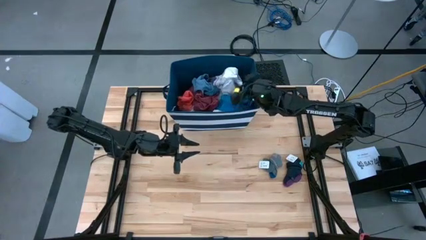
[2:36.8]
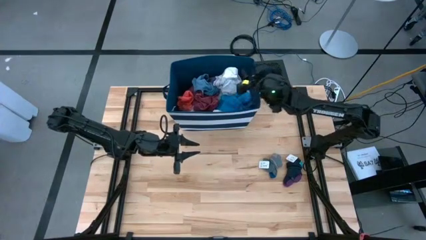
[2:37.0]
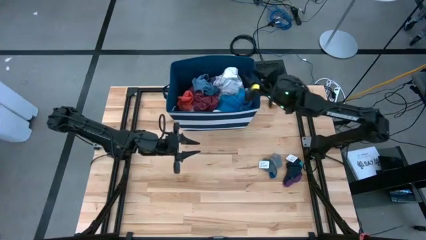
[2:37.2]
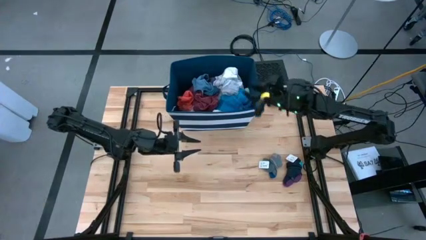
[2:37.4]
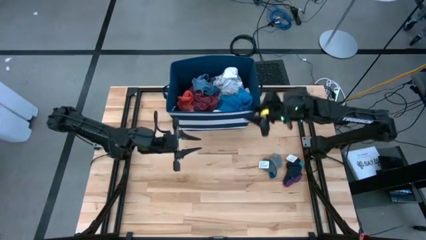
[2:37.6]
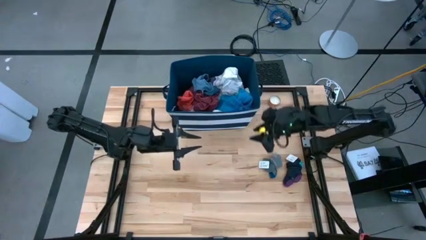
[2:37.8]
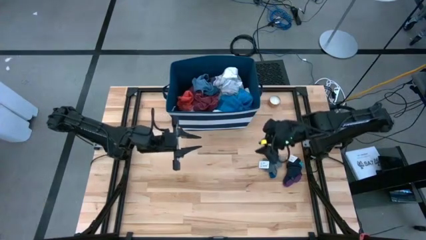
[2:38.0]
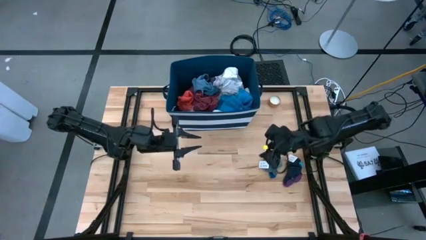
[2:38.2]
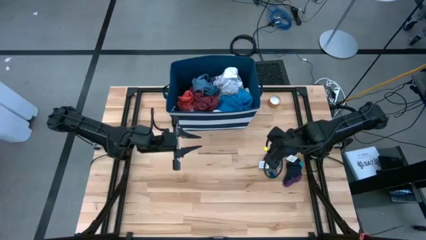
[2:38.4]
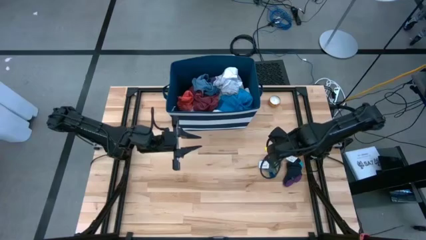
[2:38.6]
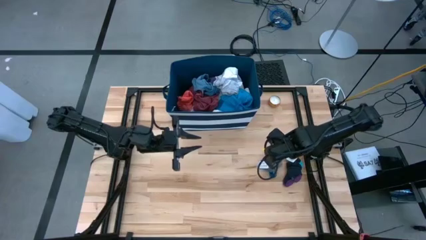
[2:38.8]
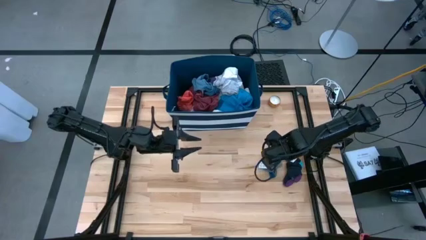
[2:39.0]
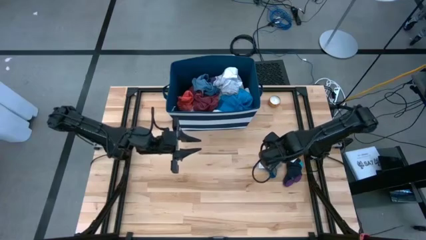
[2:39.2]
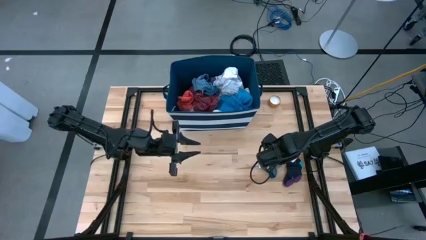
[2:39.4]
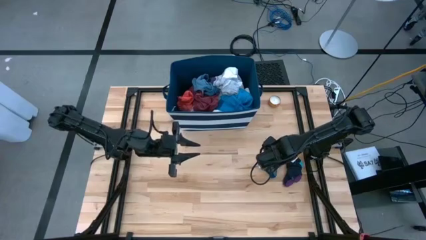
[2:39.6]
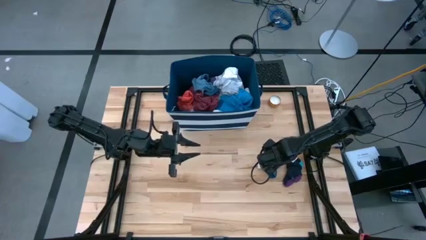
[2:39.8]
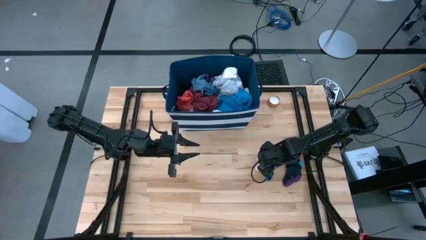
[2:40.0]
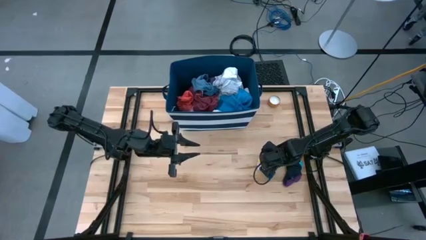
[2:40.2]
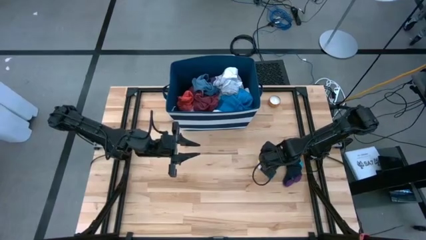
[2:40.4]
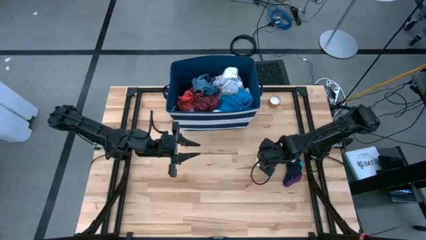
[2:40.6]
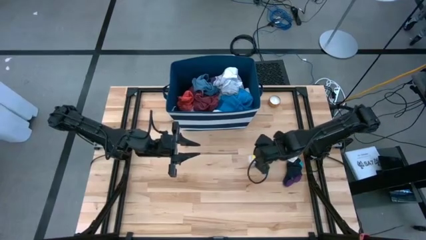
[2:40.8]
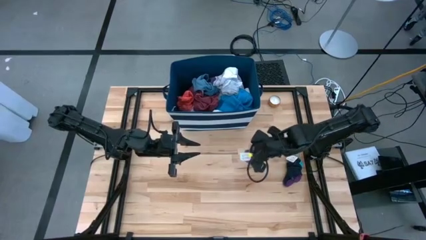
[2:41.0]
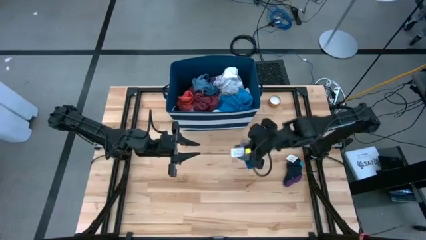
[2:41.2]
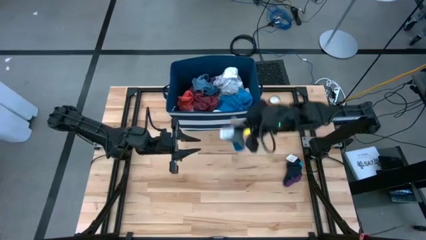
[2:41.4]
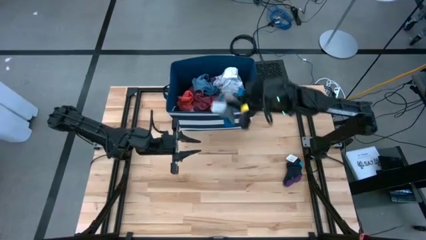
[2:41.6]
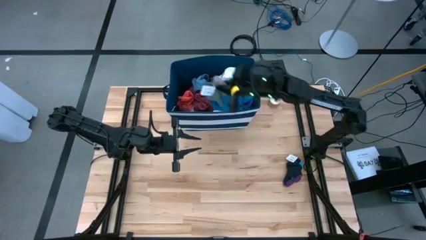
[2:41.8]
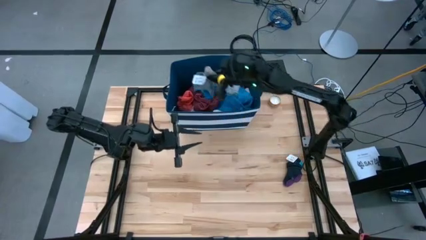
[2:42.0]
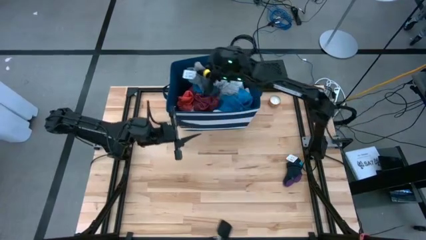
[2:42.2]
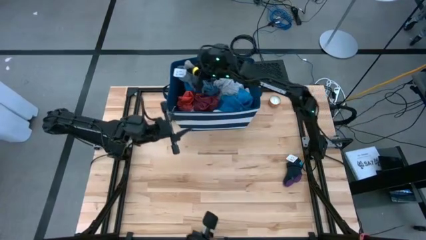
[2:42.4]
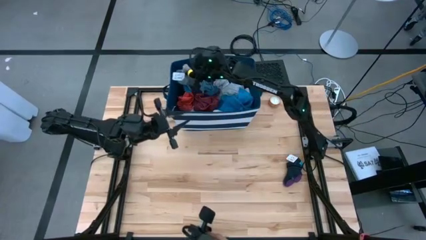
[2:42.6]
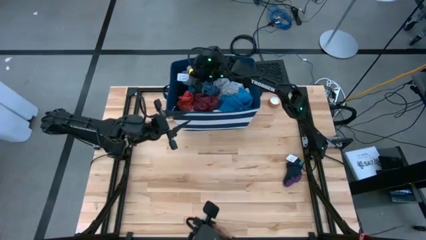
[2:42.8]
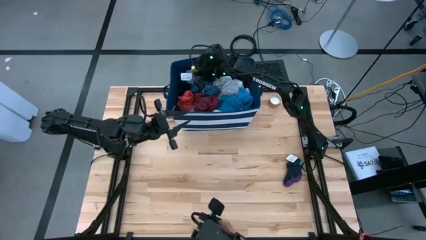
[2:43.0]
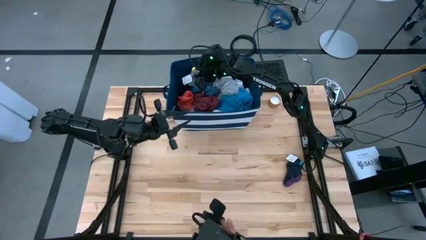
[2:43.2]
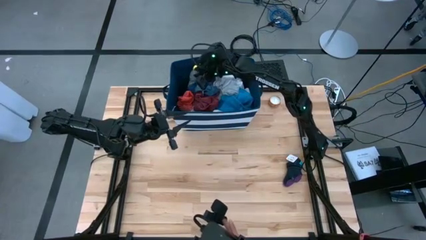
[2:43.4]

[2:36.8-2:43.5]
Task: Sort clothes
Put the gray socks into the blue laundry organizer

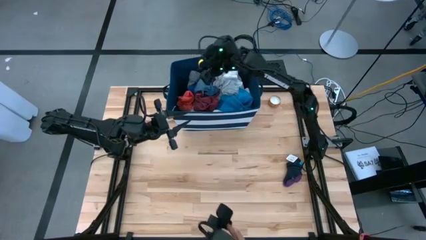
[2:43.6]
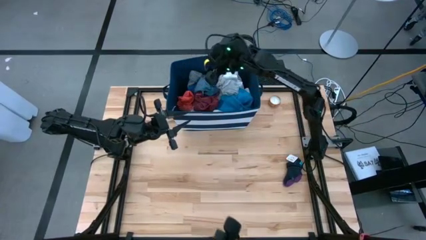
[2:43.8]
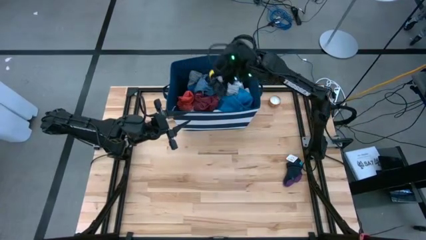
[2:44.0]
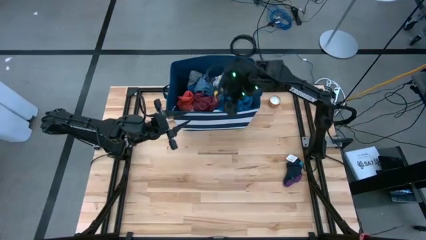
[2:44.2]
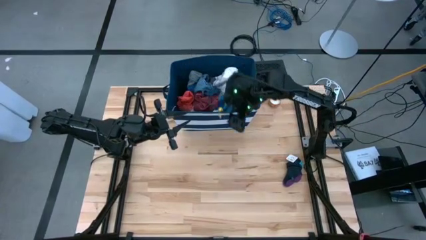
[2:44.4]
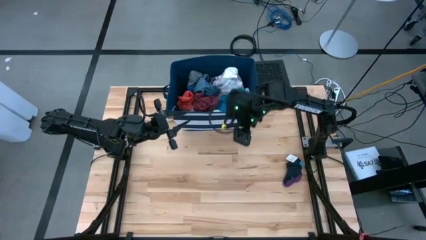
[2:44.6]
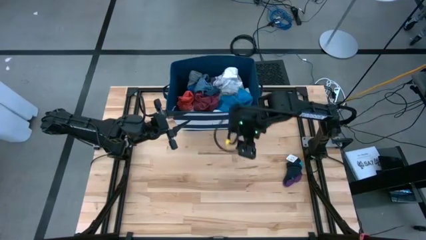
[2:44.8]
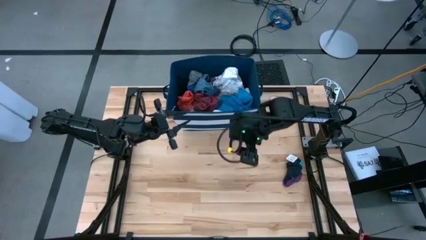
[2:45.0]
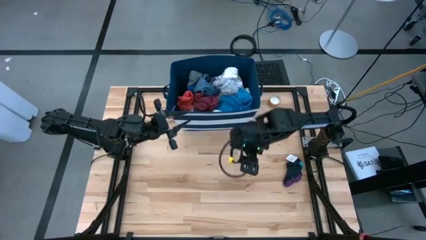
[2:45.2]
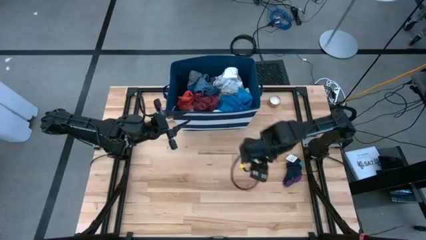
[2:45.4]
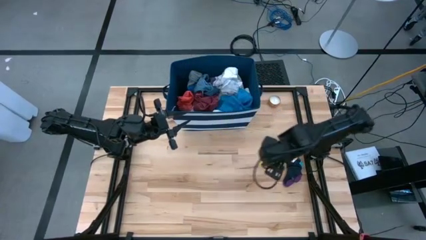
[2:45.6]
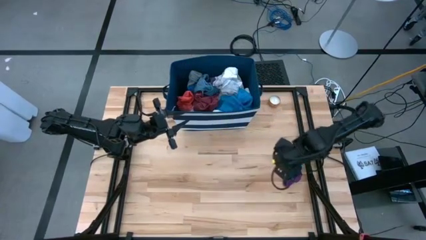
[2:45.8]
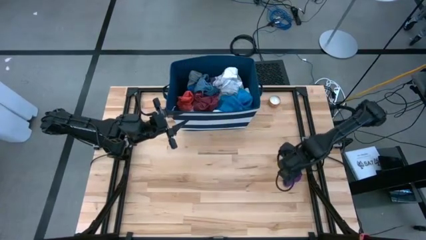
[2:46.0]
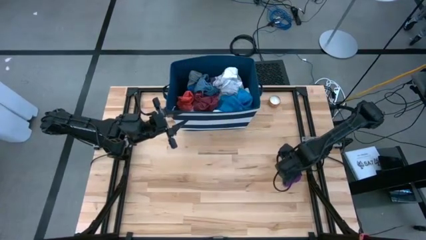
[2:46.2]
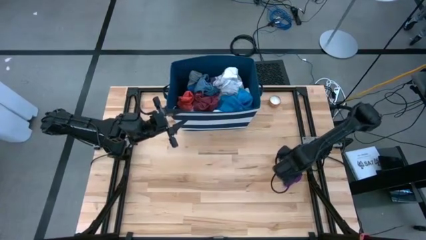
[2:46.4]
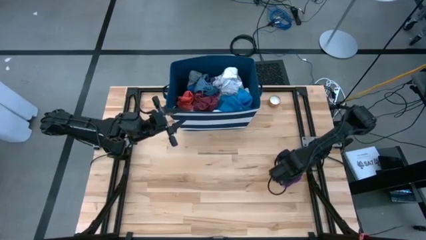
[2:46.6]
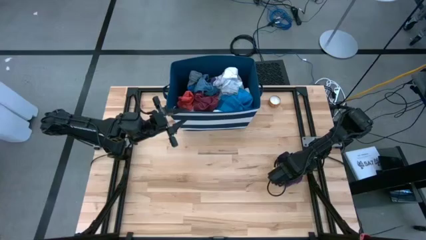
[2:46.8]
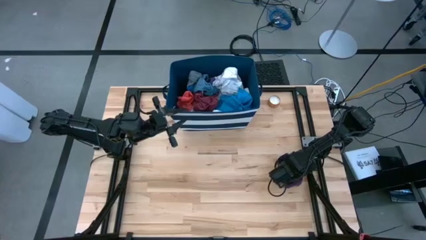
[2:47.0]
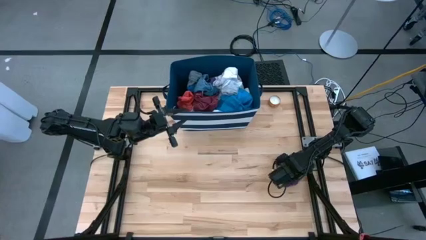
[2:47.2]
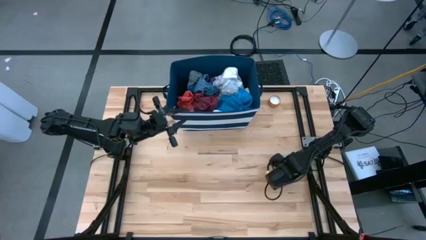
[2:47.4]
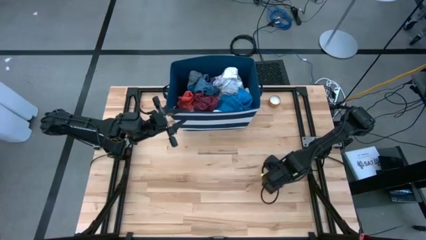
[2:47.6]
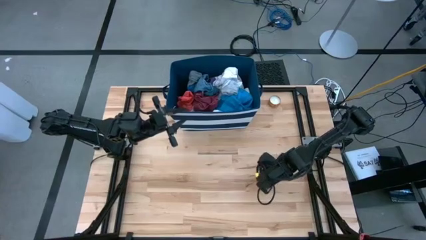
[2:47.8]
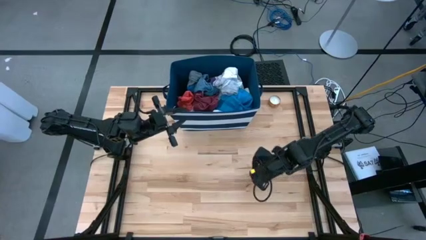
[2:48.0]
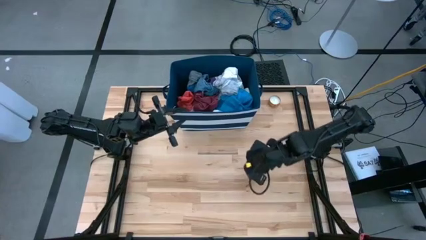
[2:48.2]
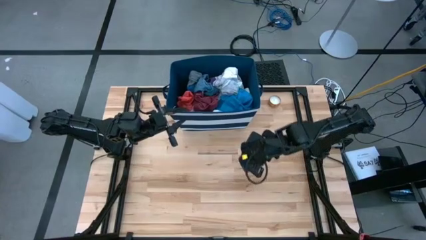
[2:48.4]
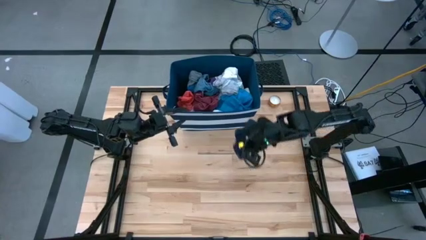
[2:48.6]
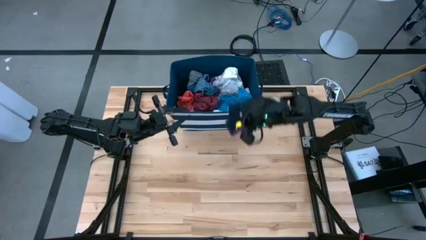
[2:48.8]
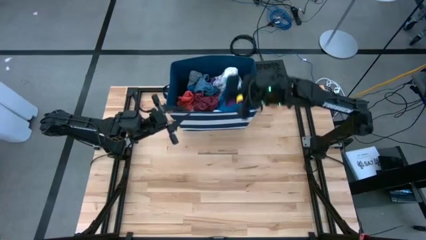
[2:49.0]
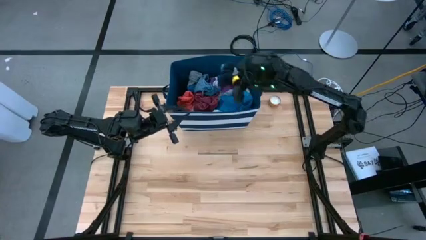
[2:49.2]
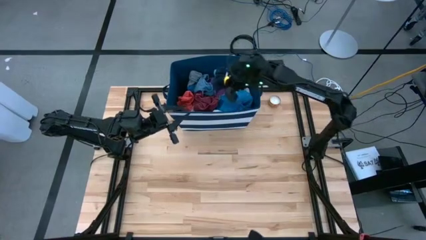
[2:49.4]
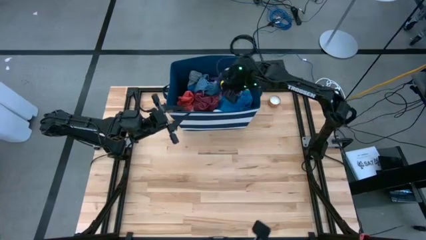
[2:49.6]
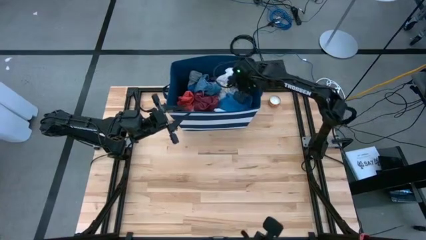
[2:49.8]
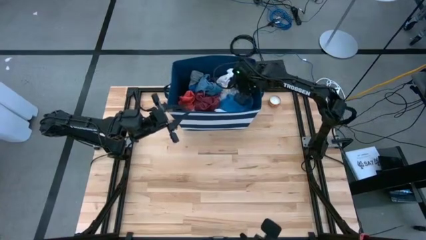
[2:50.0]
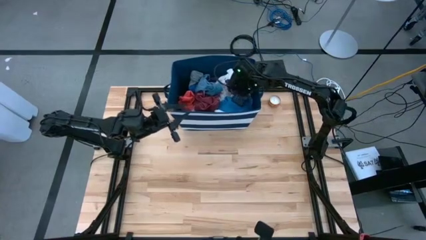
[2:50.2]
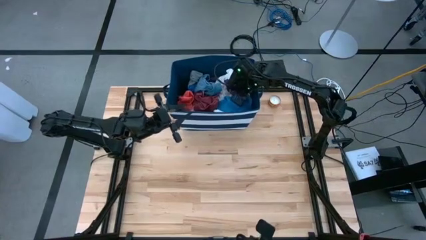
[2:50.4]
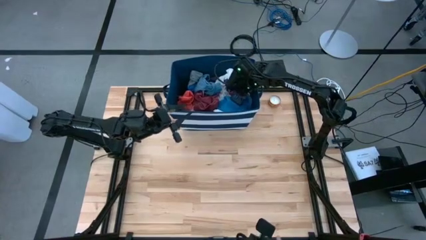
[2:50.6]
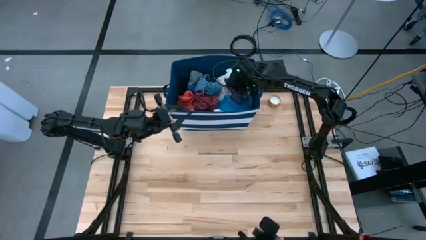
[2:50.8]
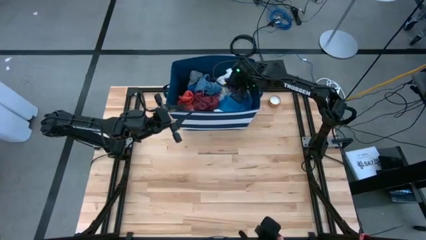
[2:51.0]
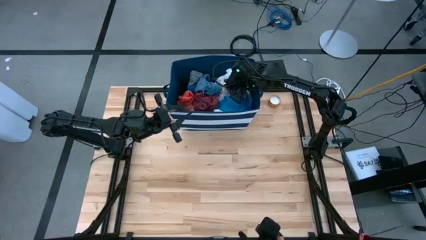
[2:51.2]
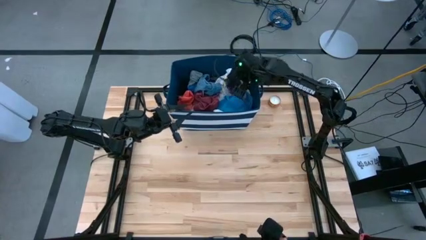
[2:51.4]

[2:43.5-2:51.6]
Put the black socks into the blue laundry organizer
